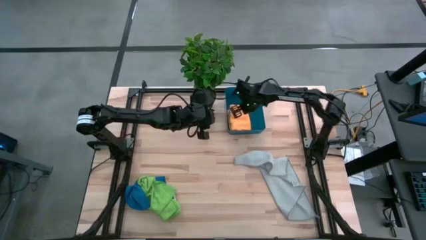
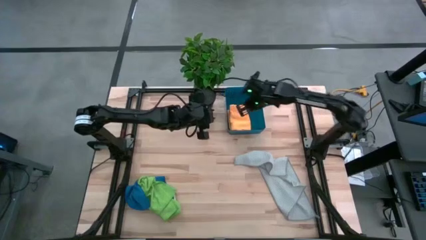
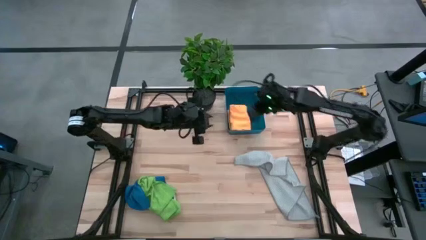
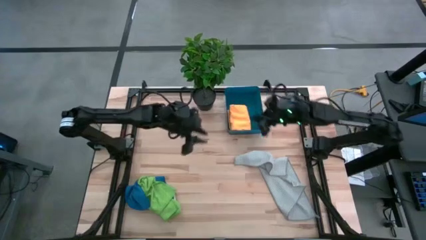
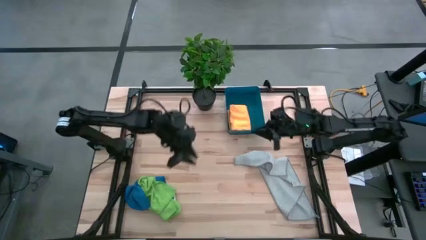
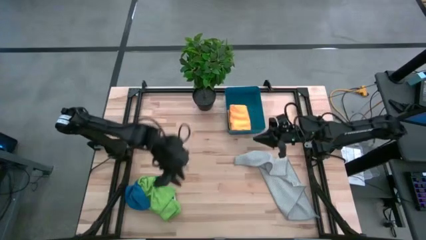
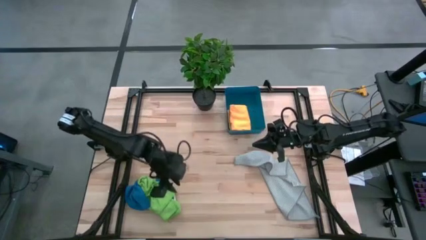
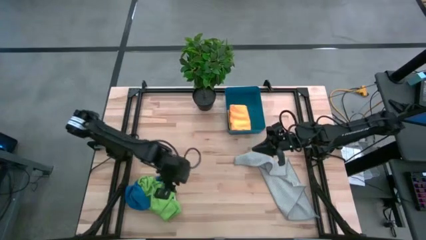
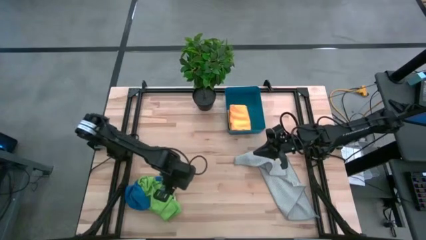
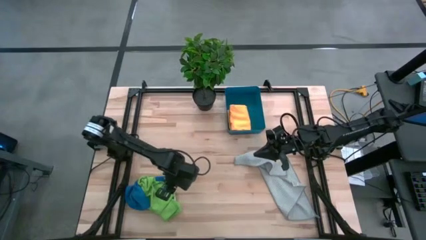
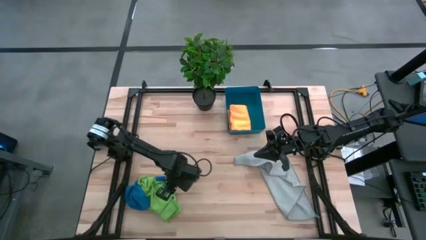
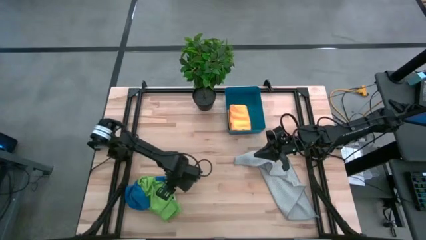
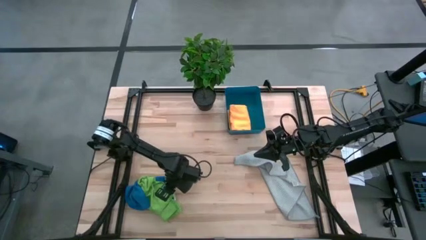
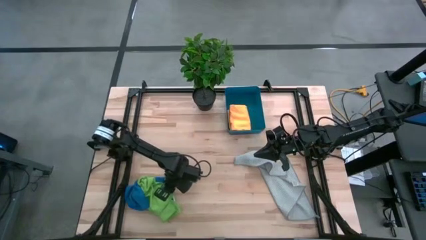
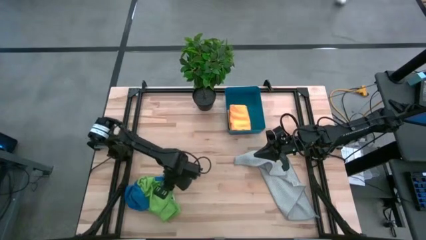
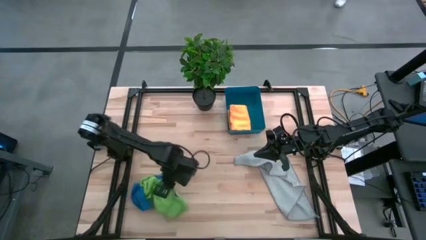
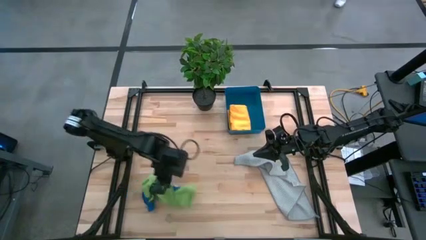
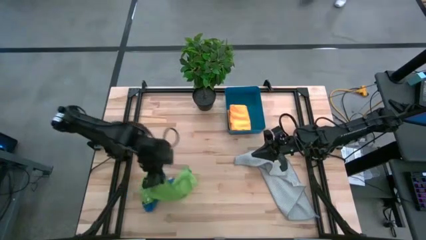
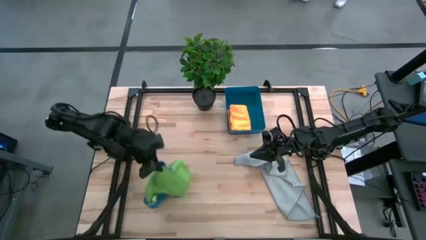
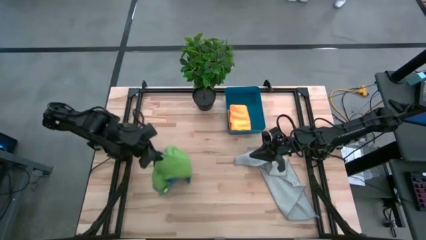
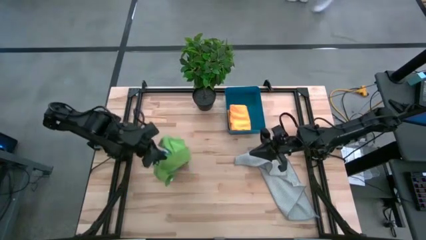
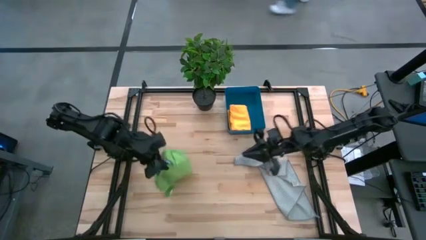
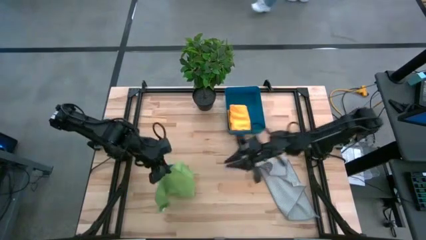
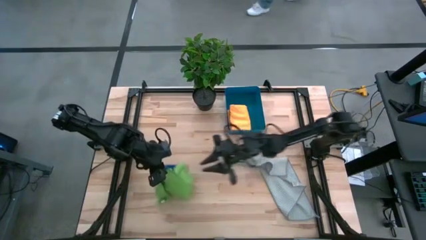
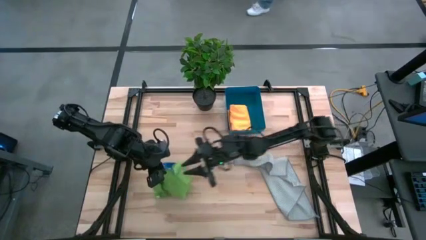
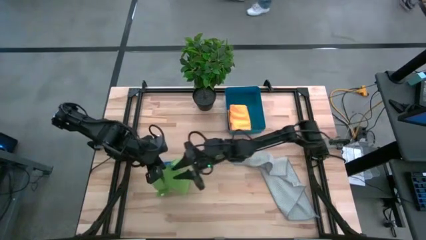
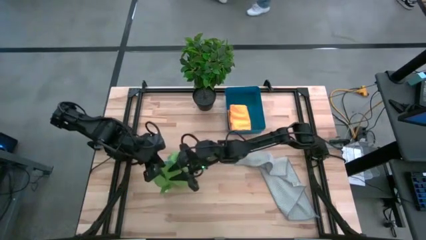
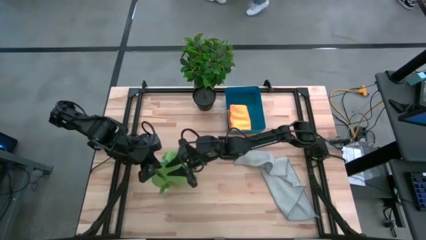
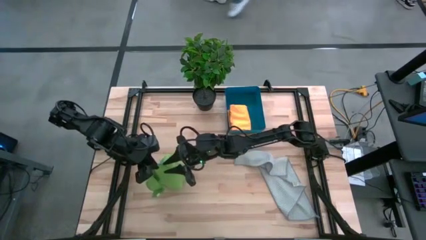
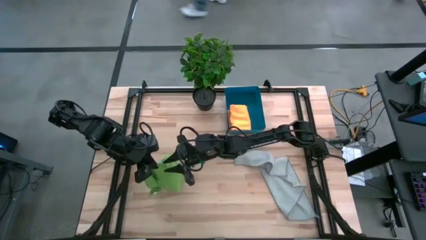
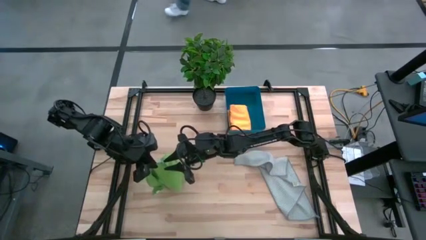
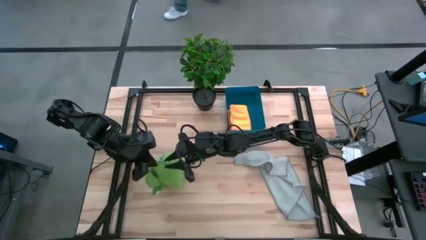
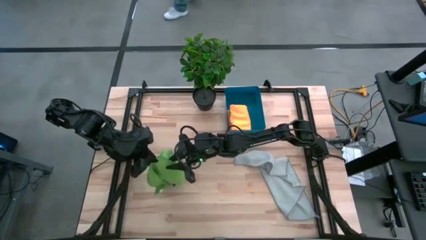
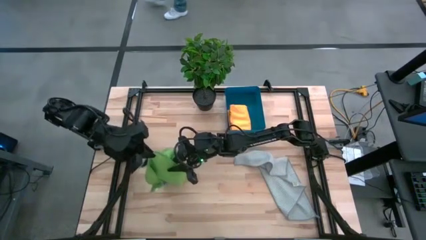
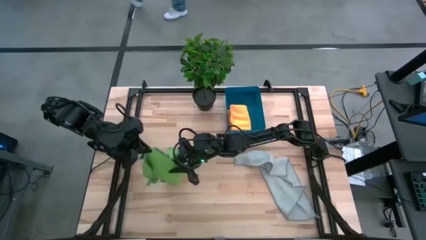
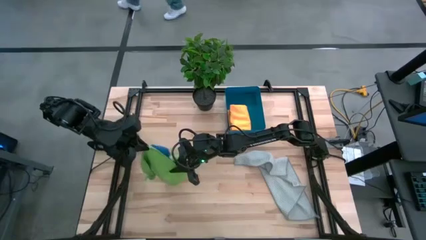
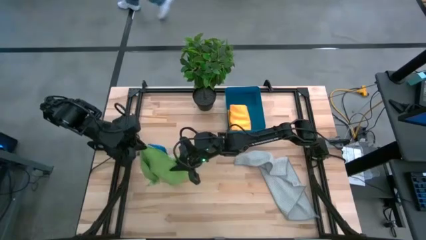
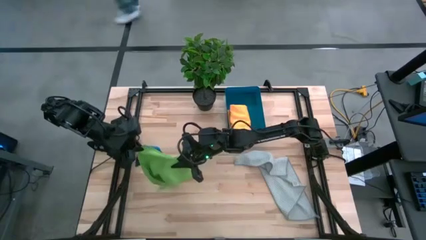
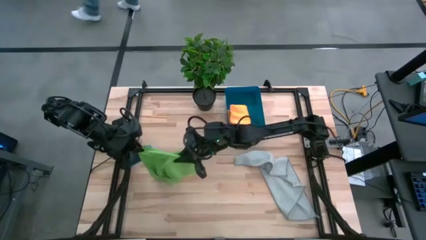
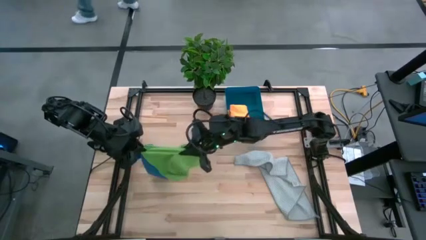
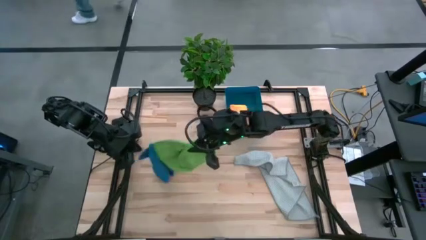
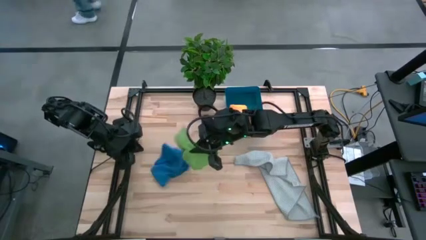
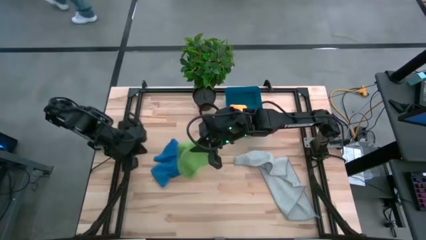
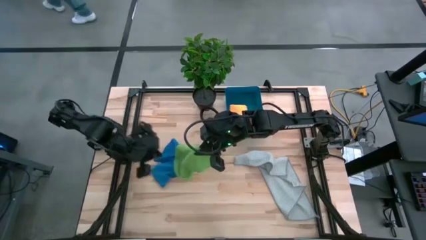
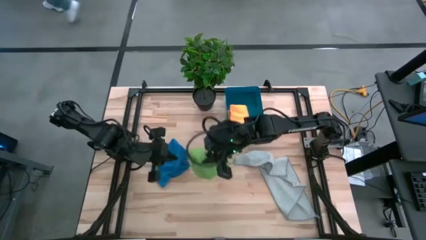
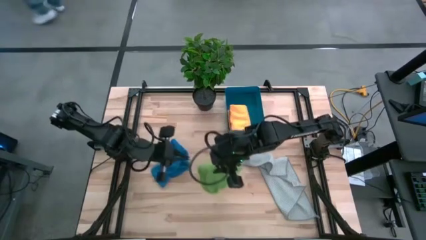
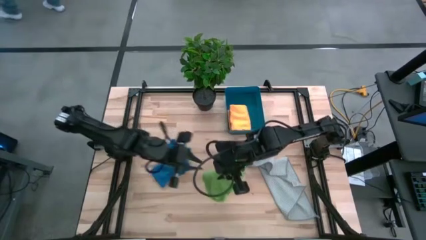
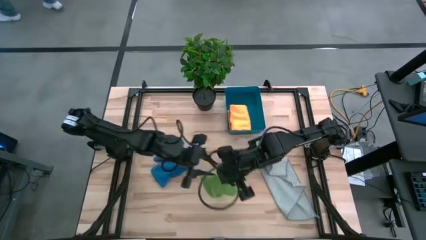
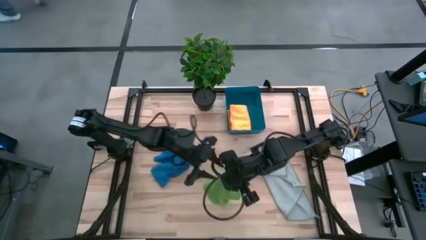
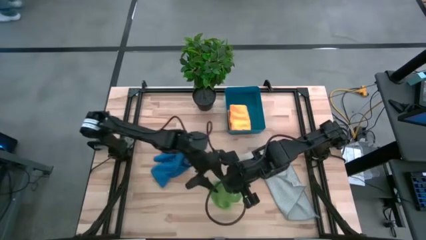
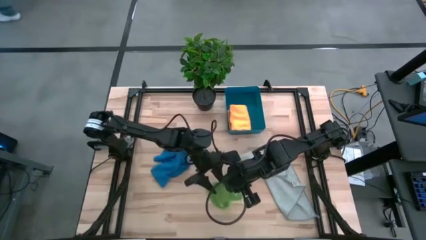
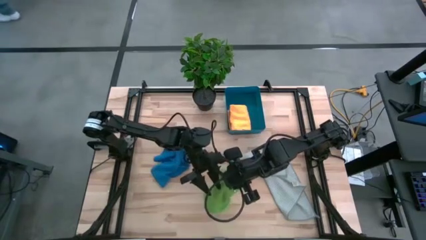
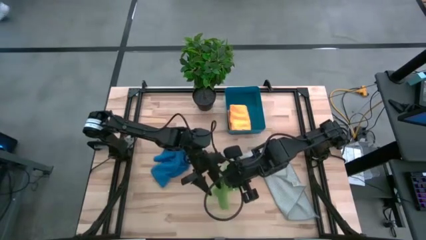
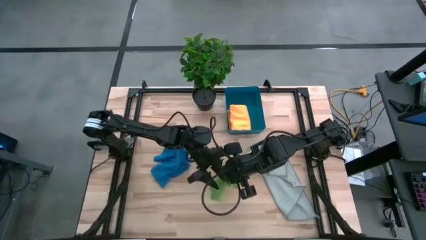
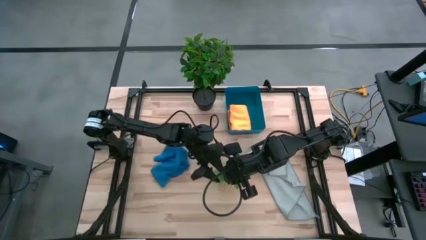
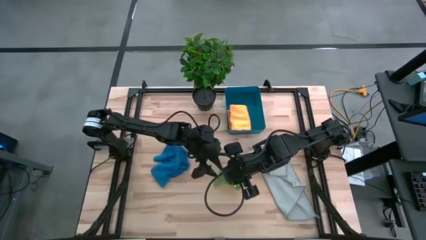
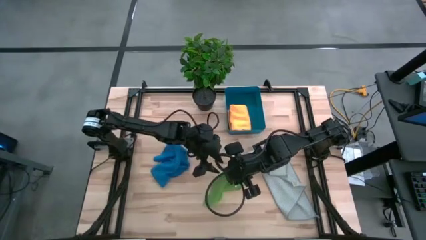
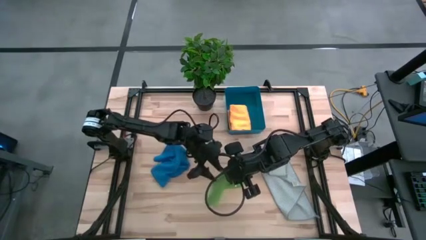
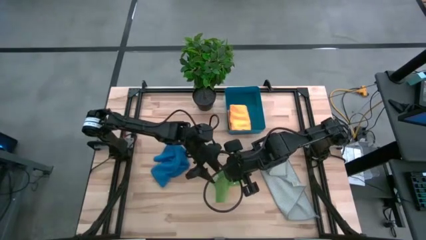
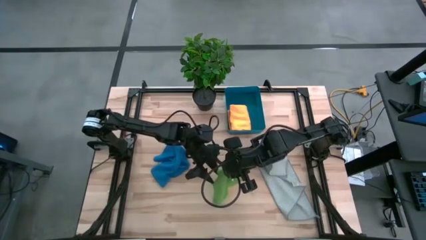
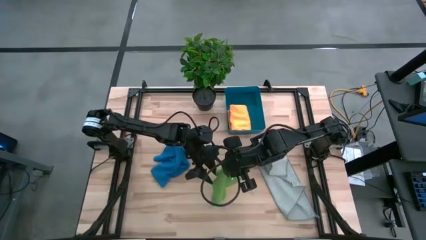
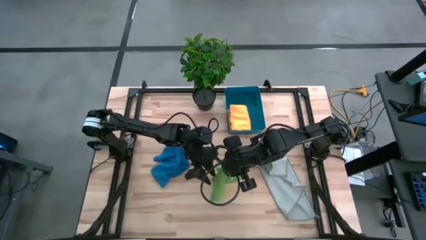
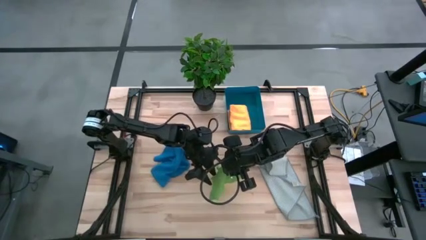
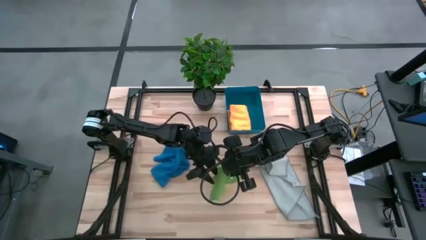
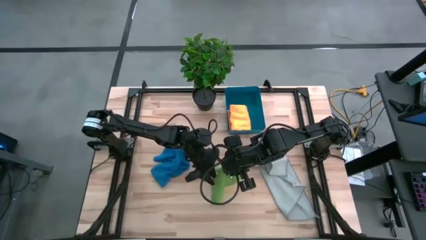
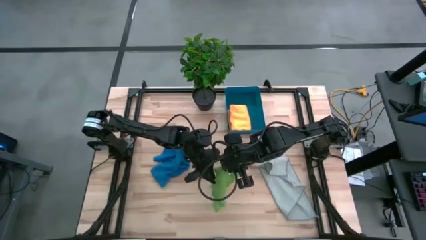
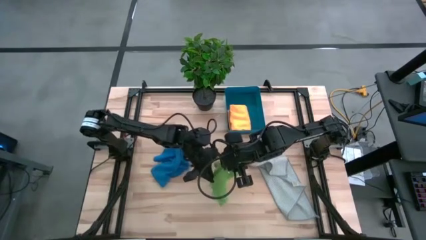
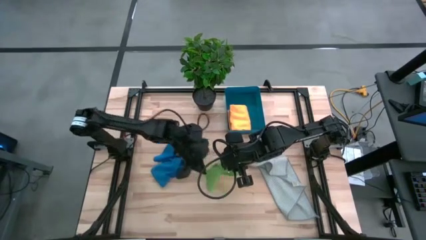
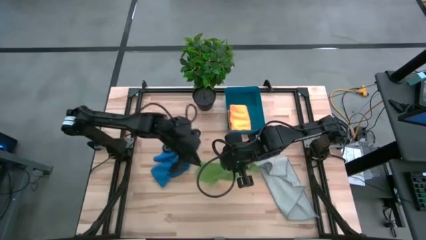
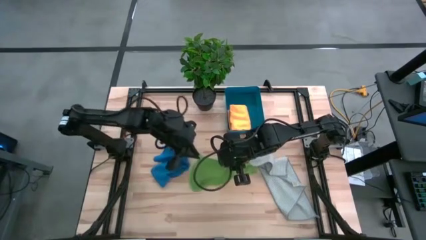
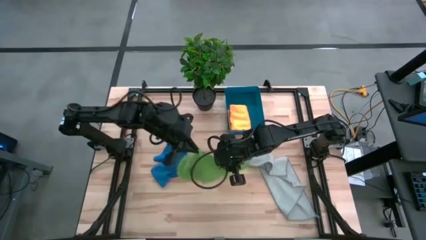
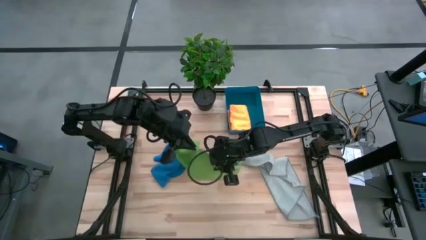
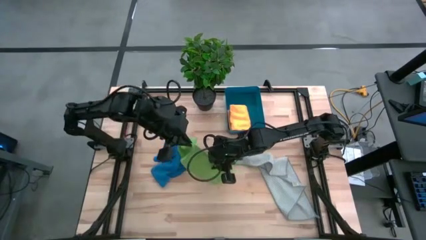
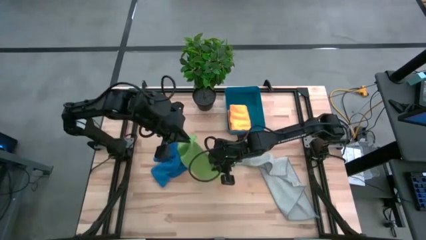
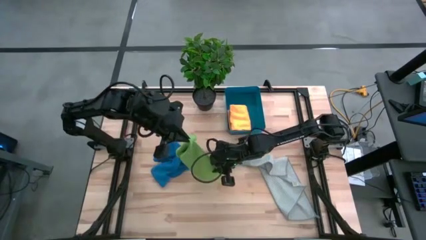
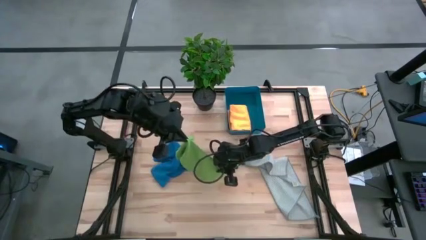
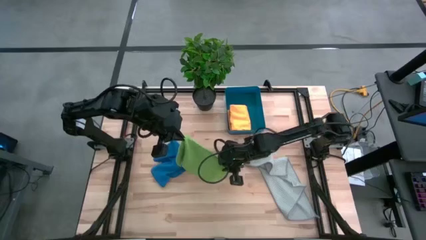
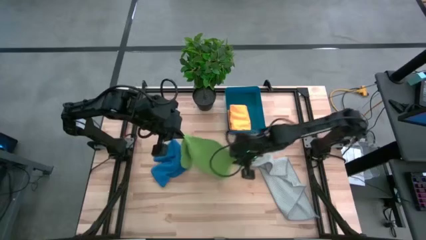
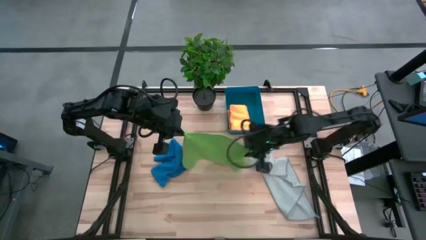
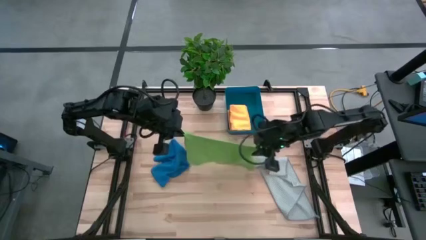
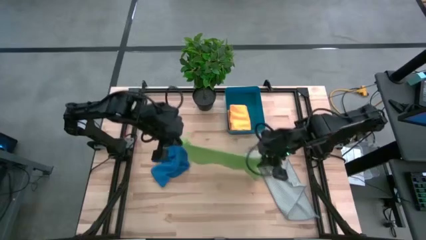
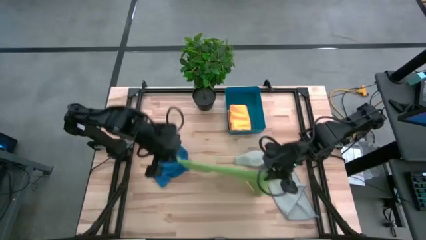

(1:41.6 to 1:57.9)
Task: Fold microfiber towels
Fold the green microfiber towel

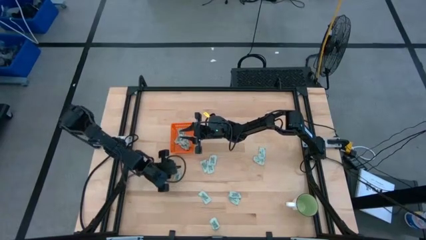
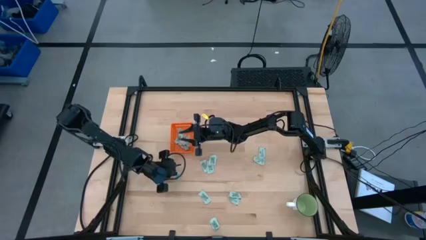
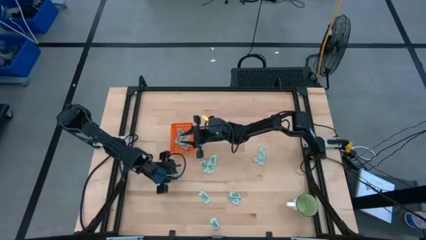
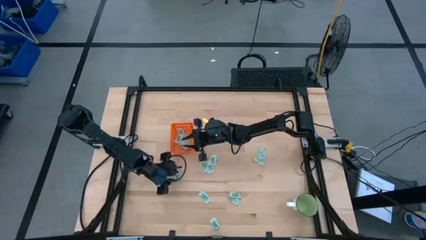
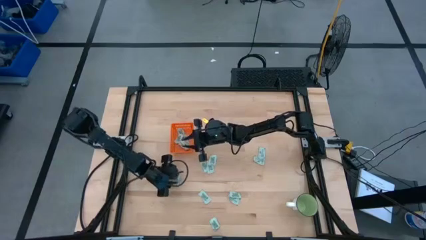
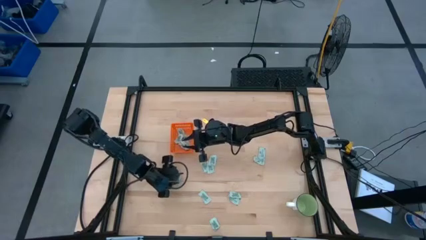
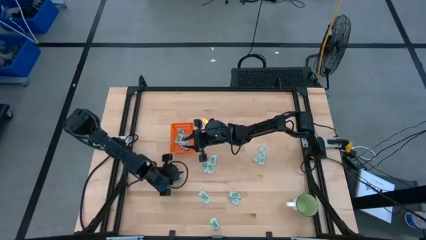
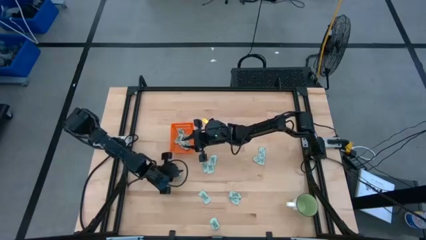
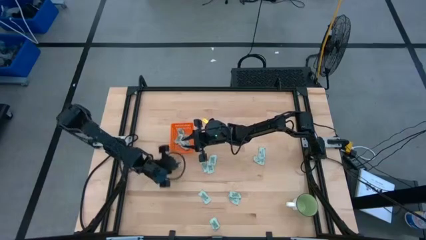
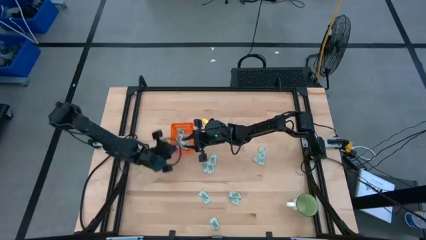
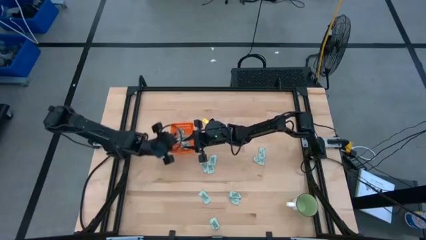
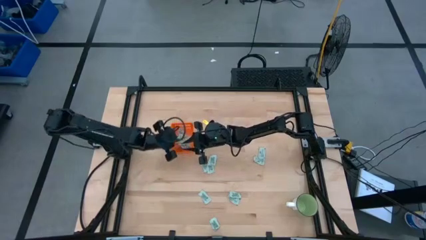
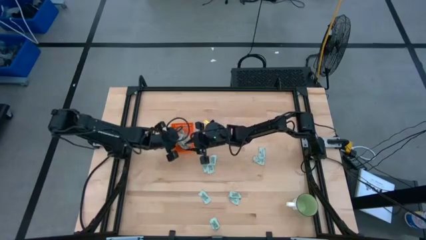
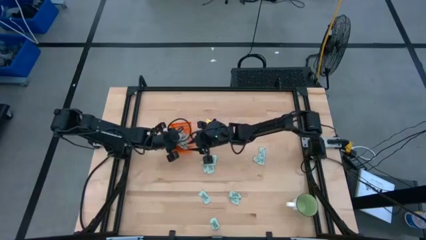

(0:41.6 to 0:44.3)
Task: Pick and place Stevia / Truvia into bins
Put the green stevia packet into the orange bin
